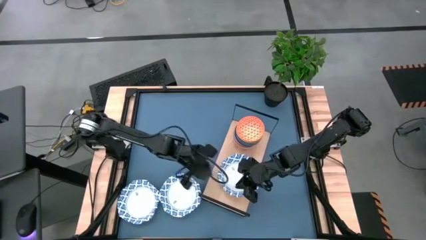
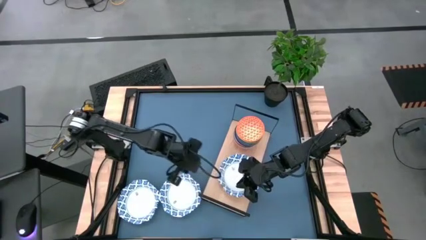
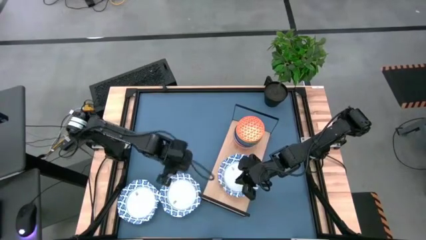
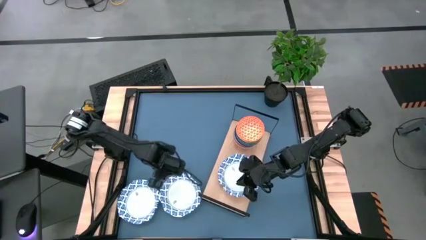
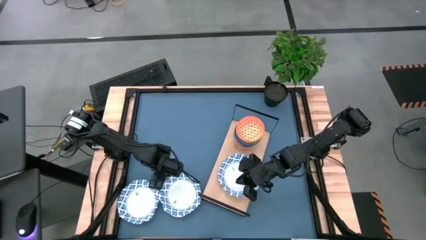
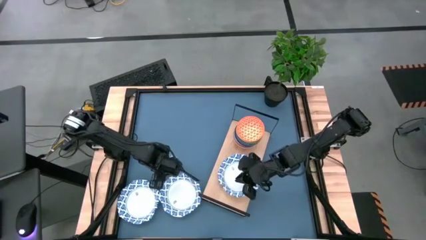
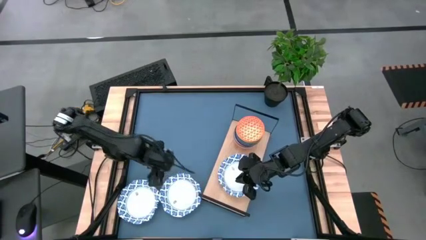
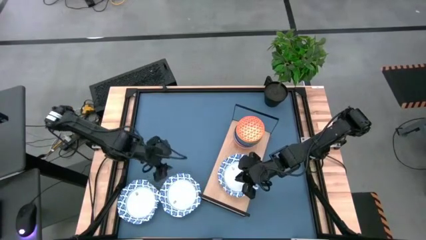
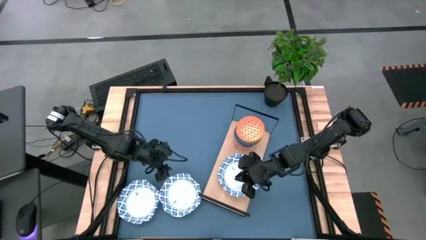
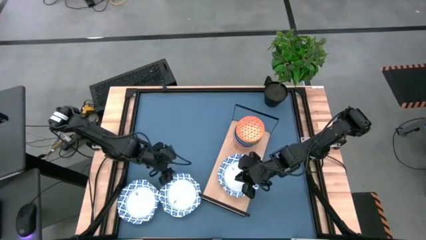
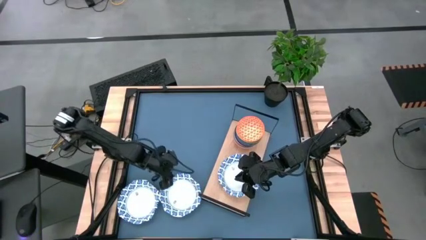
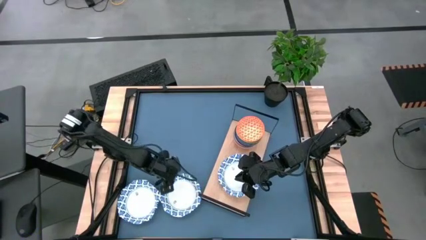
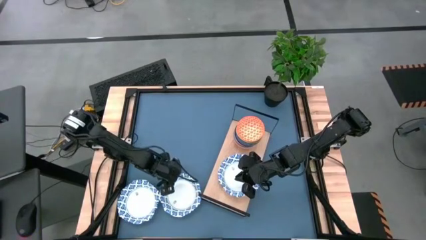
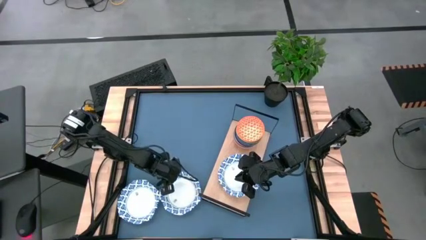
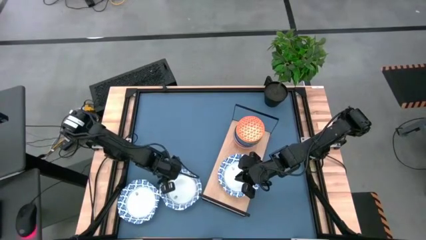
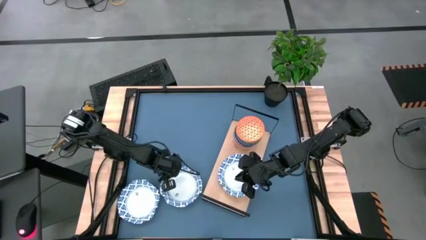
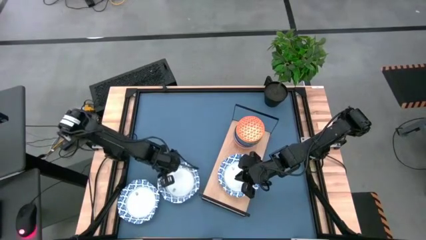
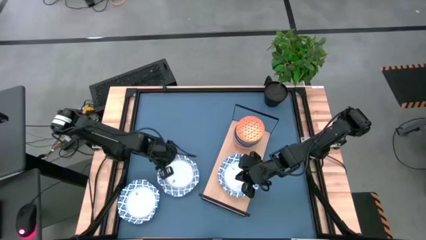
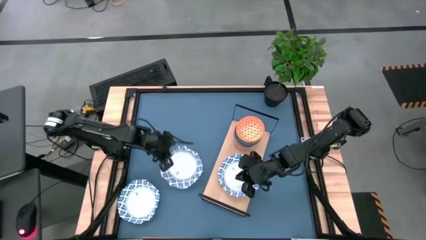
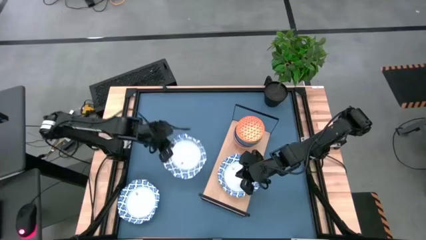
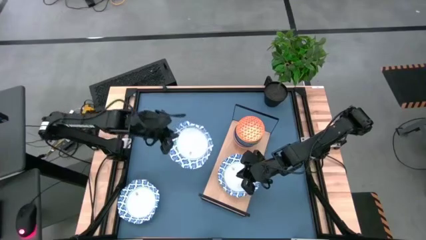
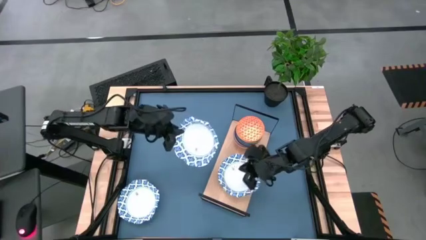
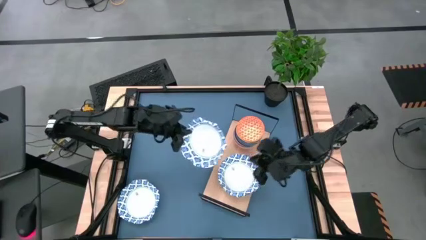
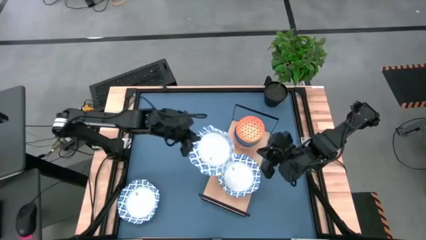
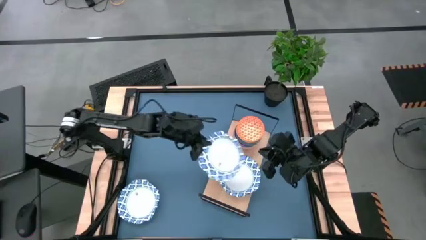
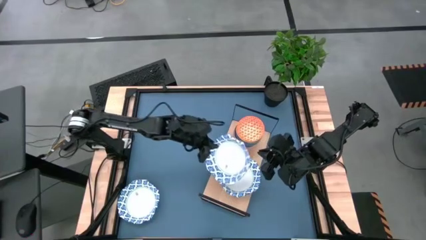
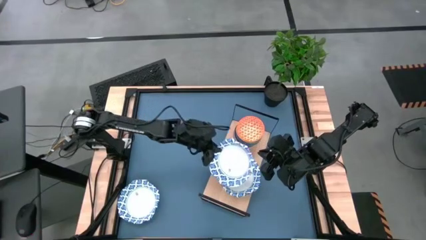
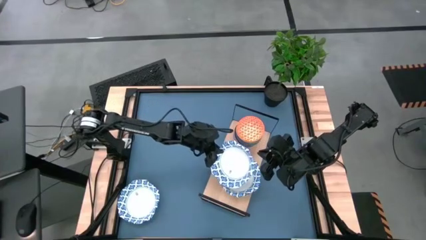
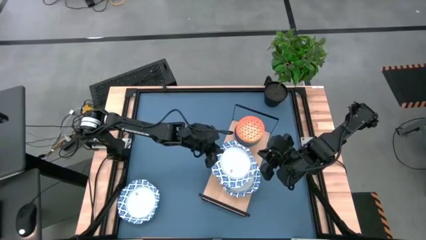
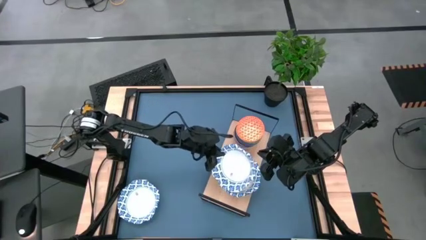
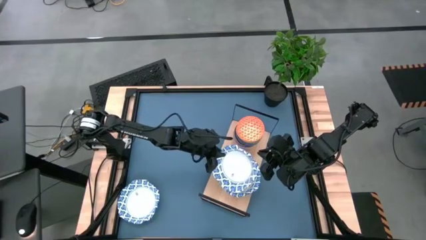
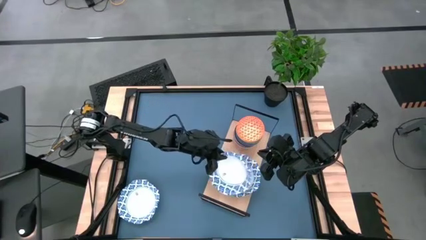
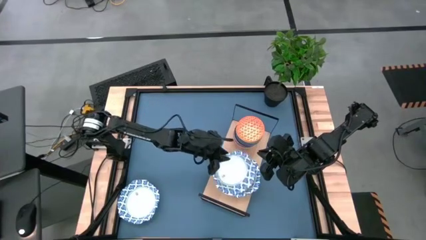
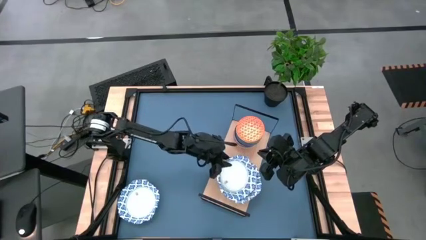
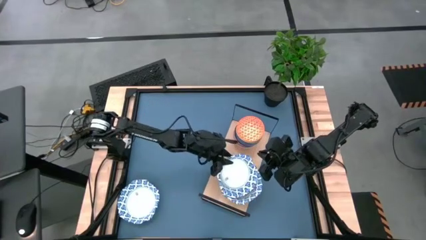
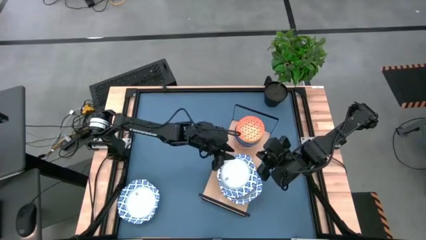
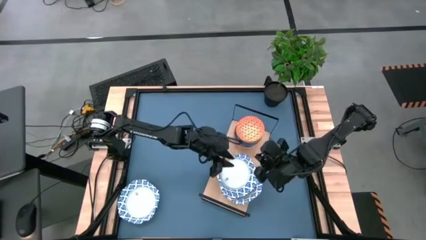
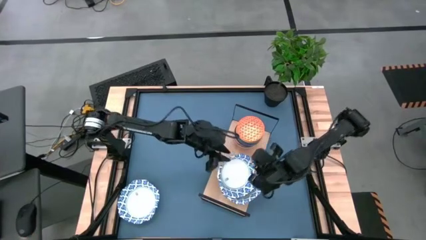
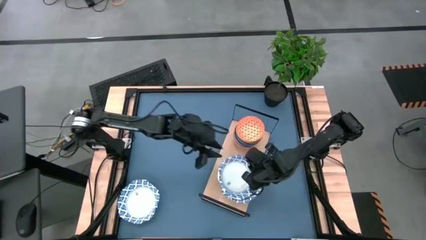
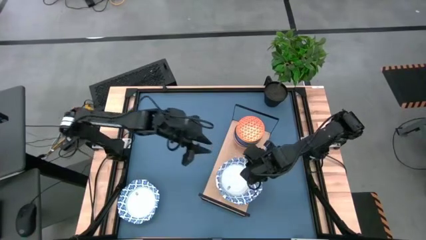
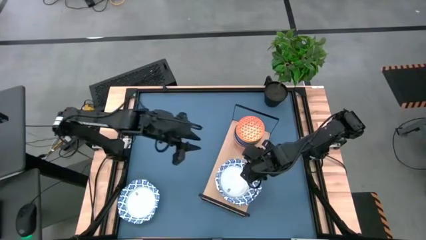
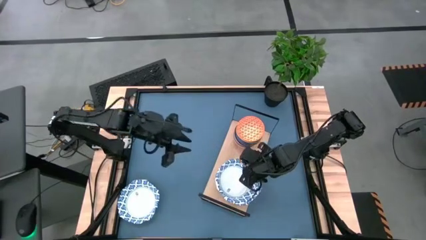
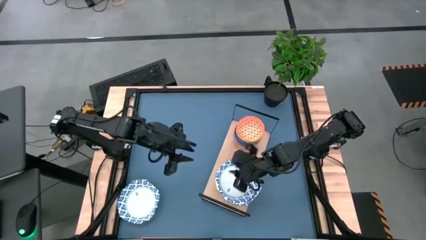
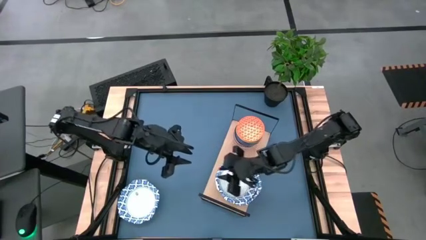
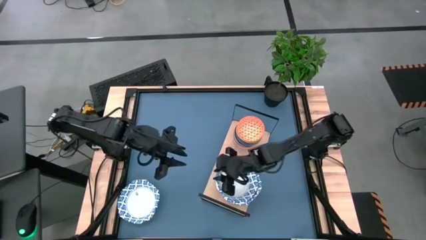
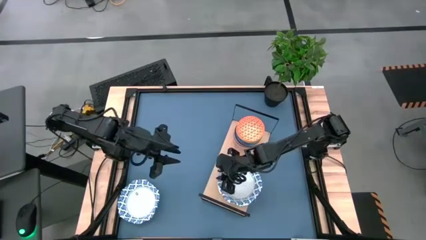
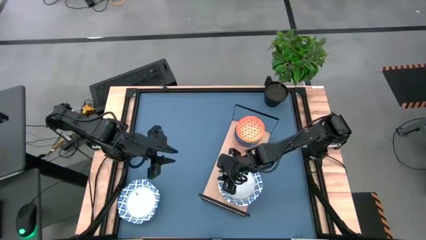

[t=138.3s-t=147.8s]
Task: Place and stack bowls onto a shelf
Stack the white pattern plate into the white pattern plate on the shelf

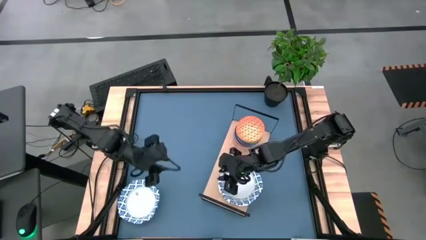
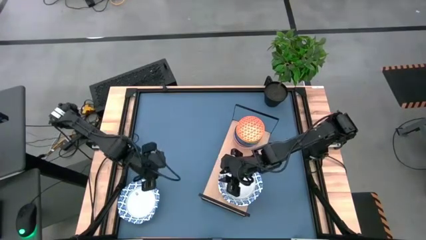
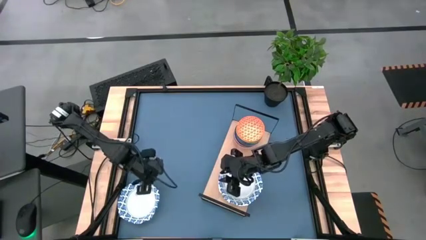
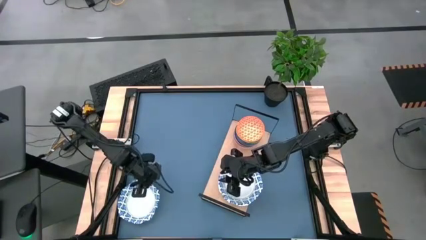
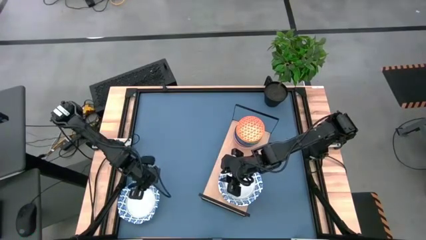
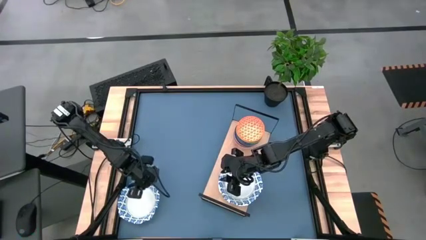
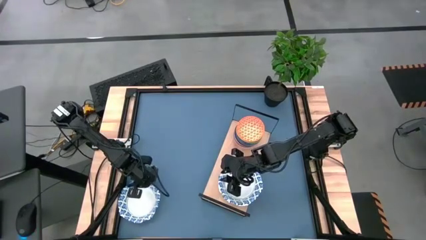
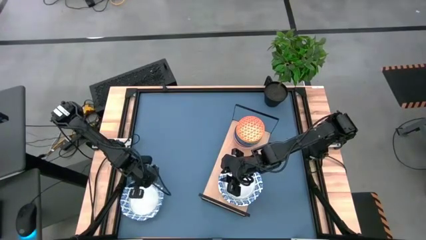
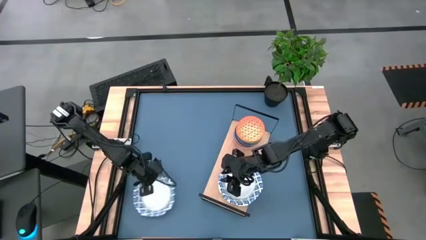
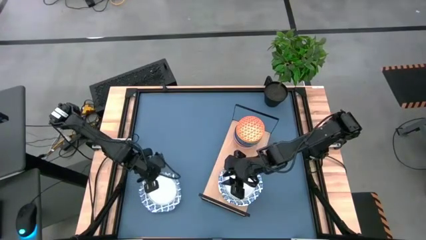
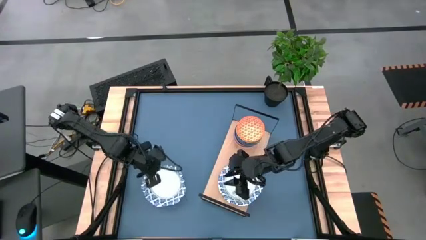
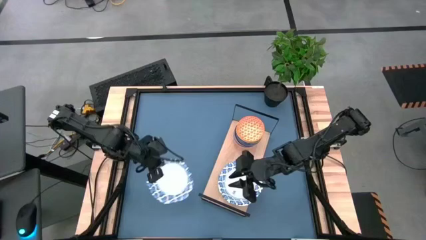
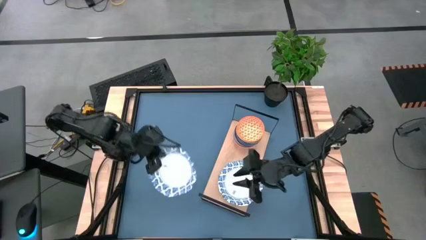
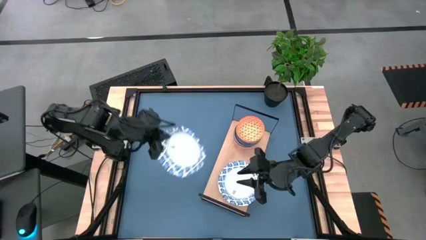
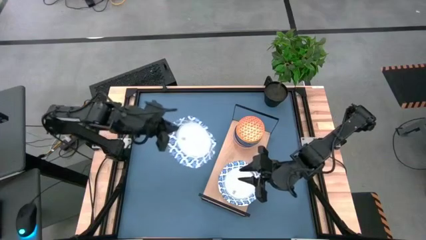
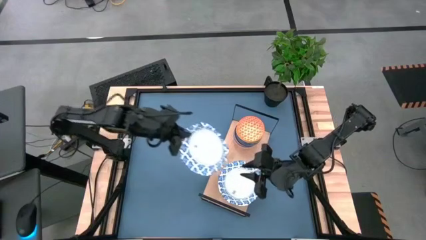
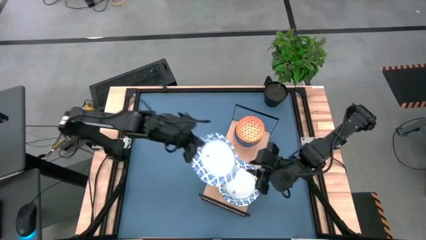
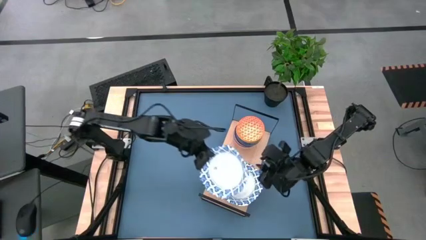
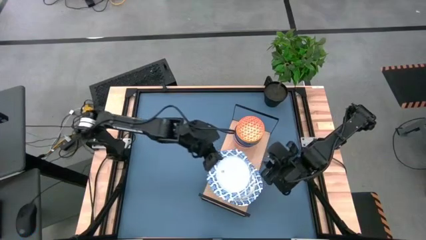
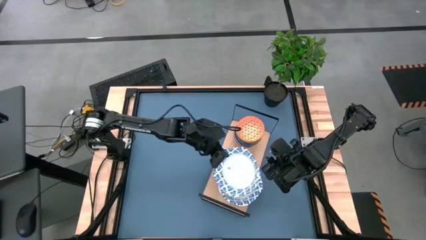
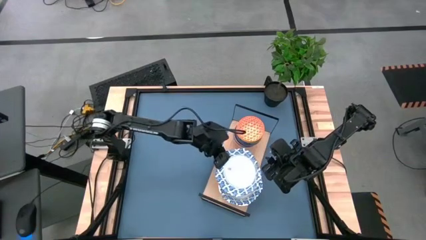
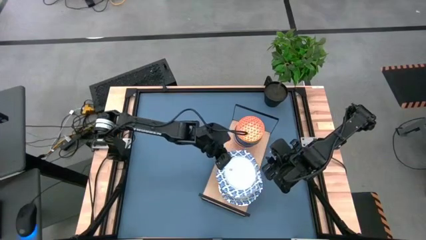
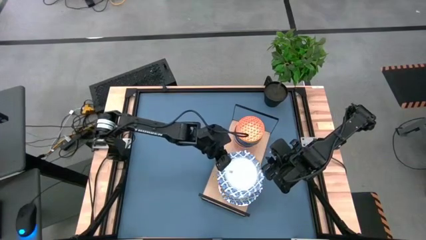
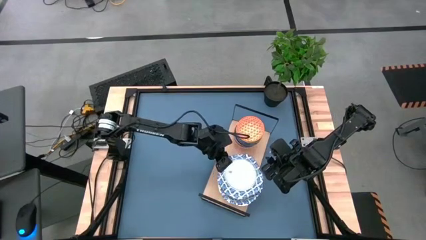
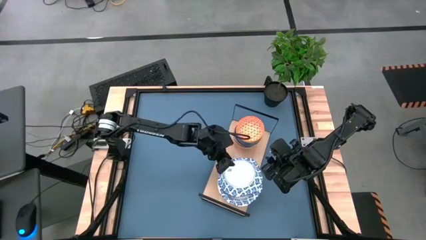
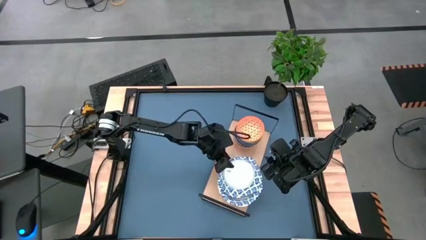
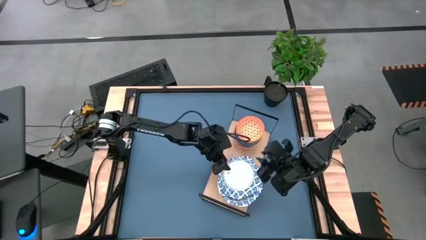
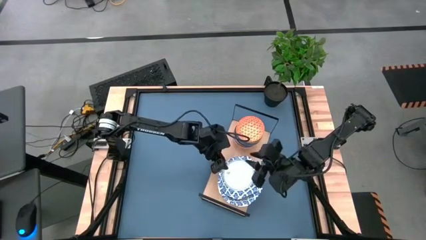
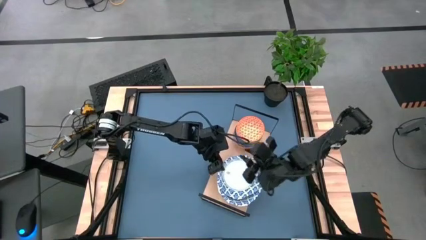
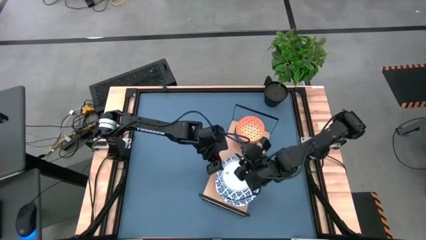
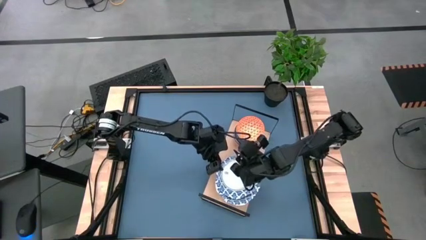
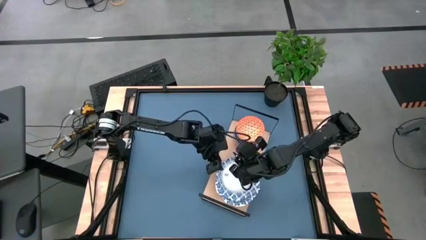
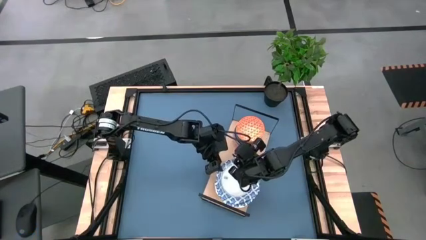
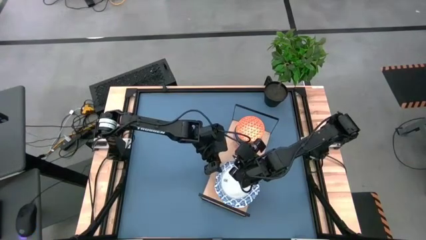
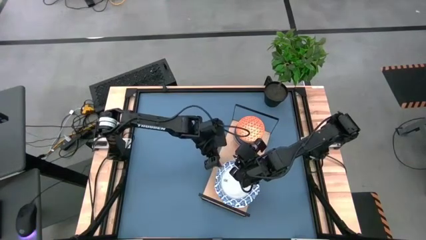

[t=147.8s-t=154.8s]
Stack the white pattern plate into the white pattern plate on the shelf

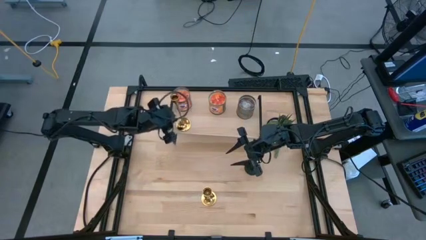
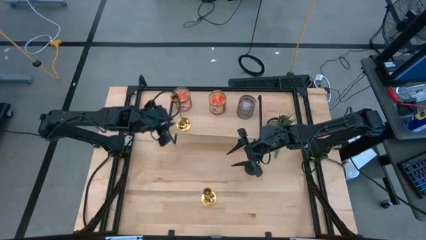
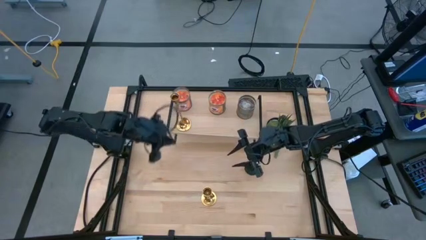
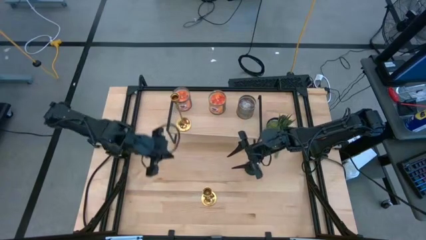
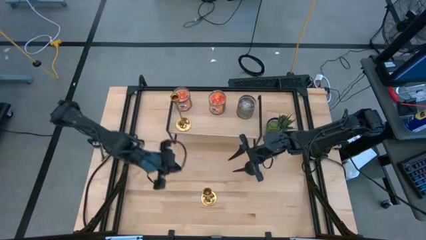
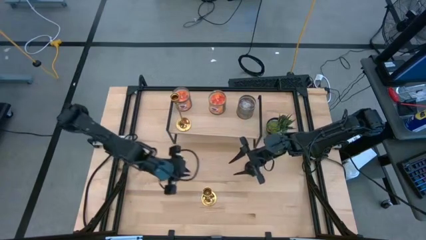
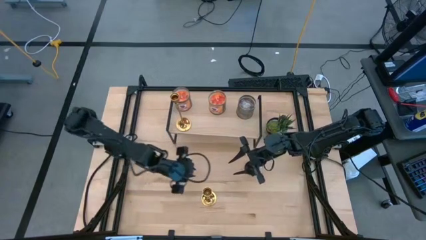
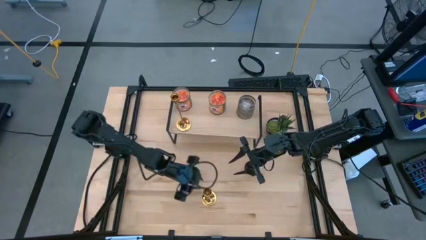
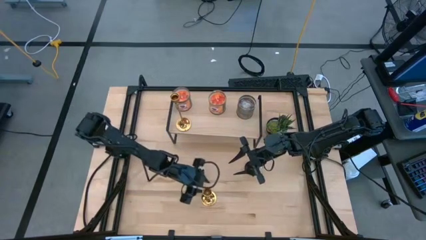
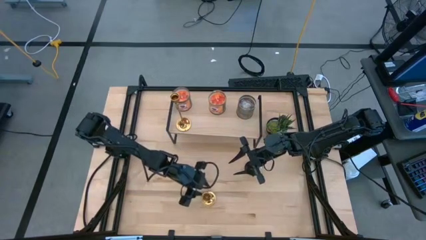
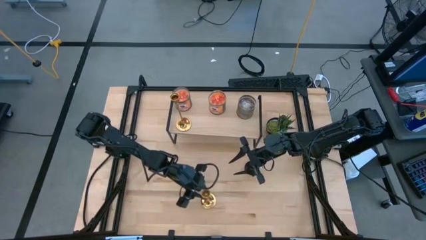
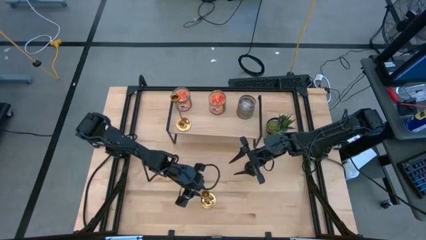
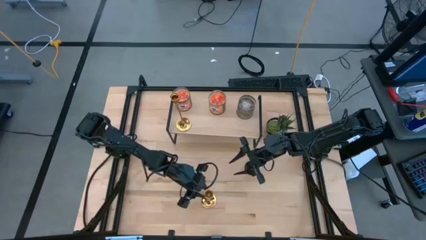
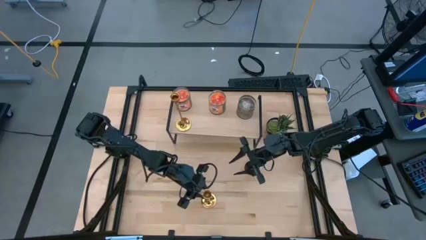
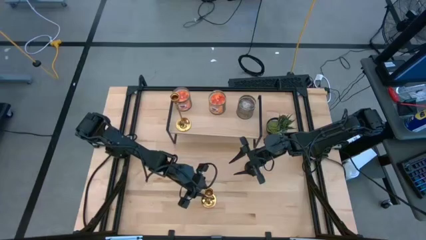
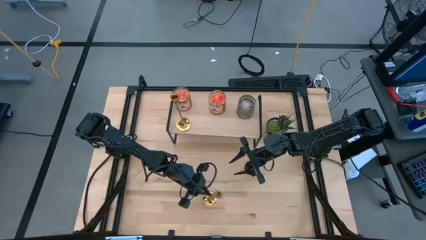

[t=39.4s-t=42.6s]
Task: Pick & Place candle stick holders
Put the gold candle holder on the shelf
